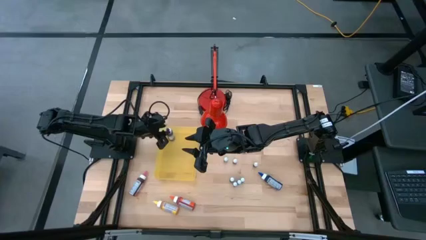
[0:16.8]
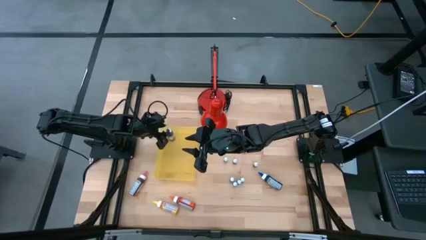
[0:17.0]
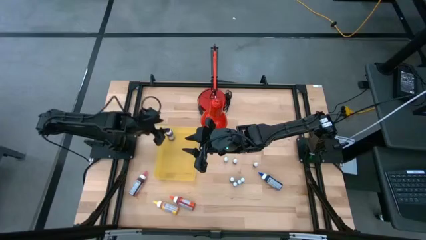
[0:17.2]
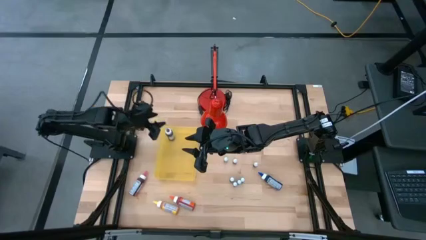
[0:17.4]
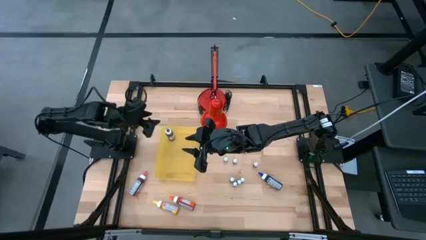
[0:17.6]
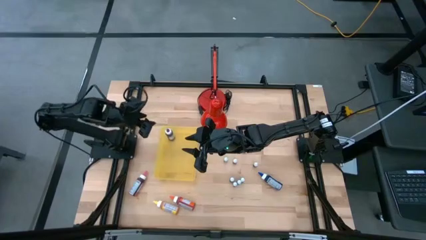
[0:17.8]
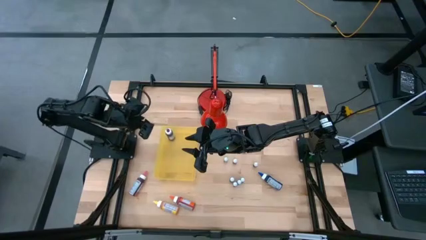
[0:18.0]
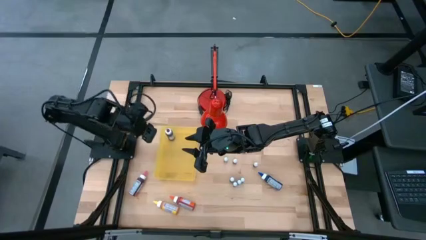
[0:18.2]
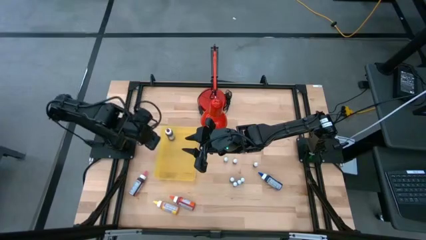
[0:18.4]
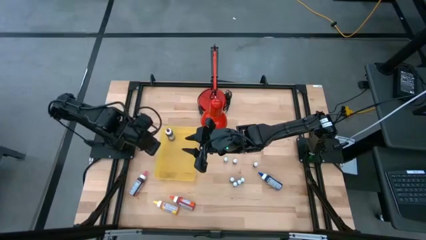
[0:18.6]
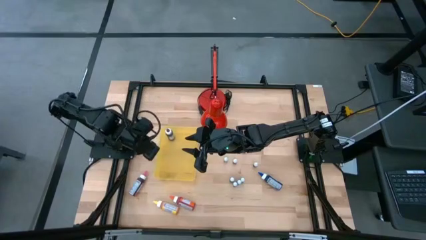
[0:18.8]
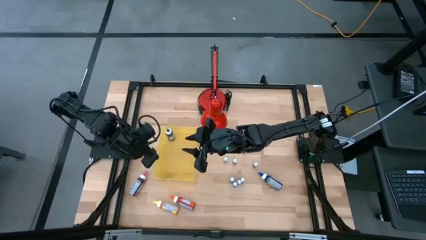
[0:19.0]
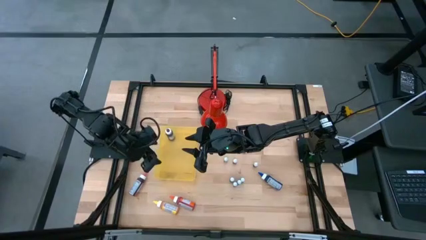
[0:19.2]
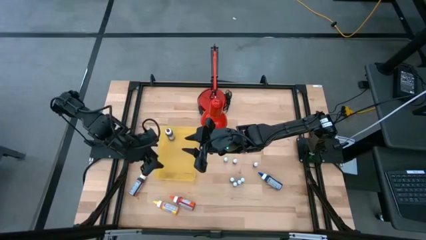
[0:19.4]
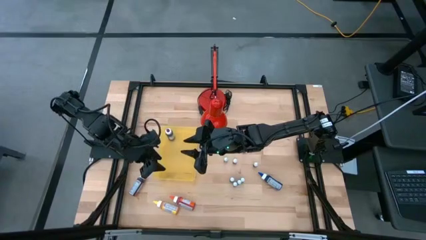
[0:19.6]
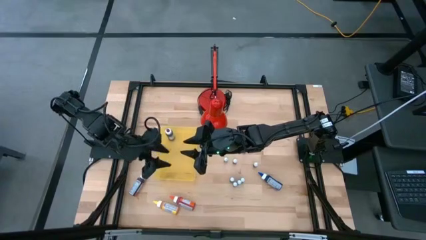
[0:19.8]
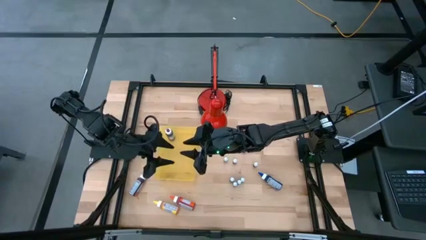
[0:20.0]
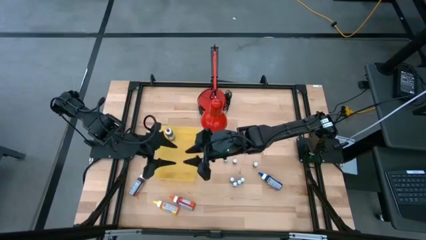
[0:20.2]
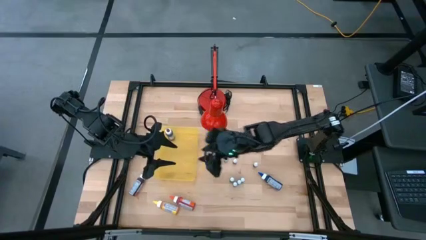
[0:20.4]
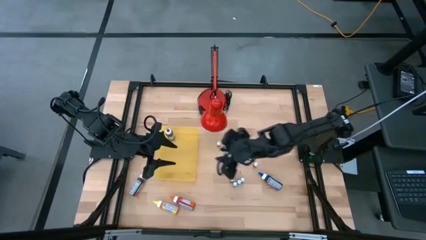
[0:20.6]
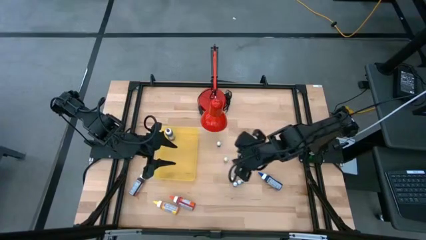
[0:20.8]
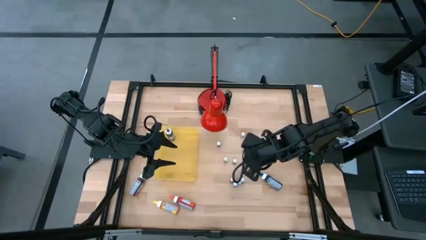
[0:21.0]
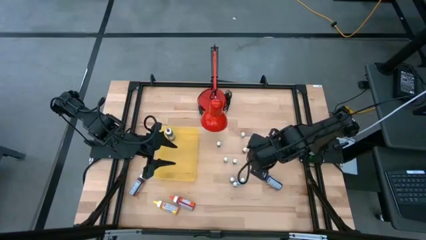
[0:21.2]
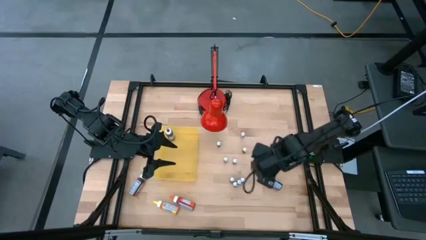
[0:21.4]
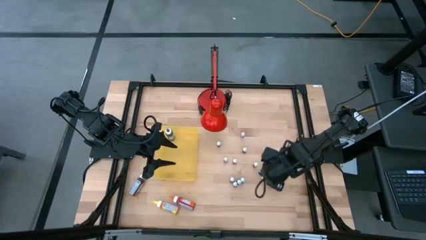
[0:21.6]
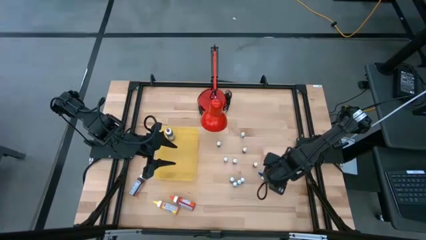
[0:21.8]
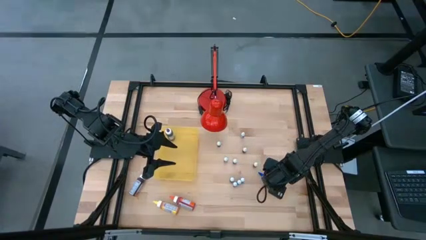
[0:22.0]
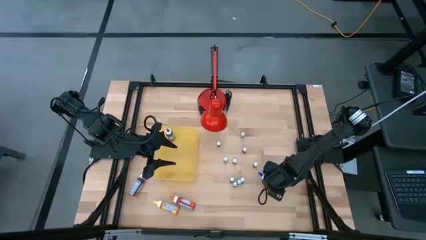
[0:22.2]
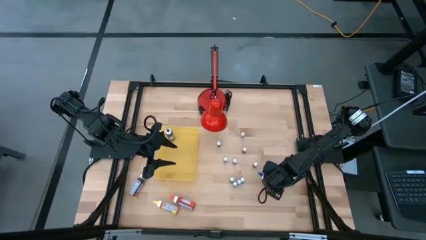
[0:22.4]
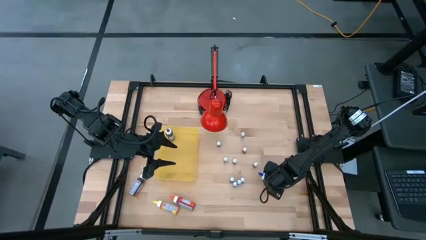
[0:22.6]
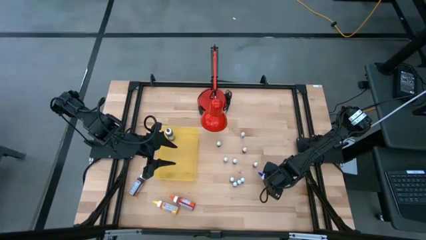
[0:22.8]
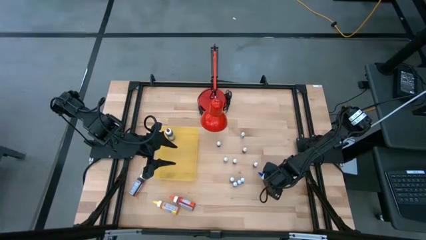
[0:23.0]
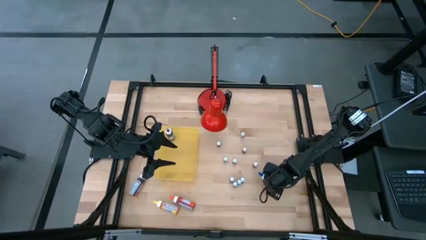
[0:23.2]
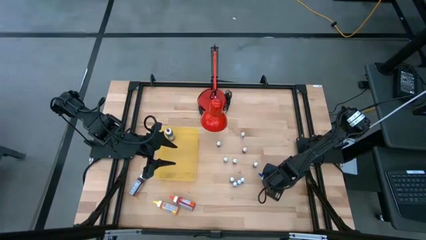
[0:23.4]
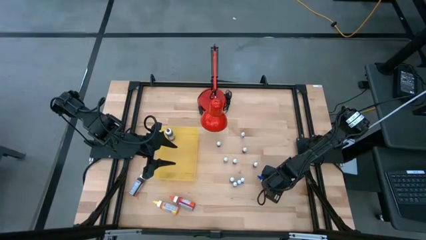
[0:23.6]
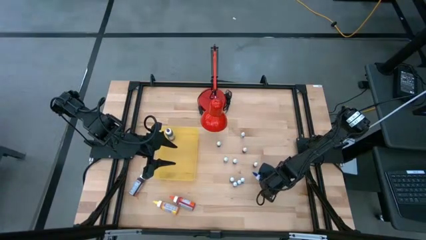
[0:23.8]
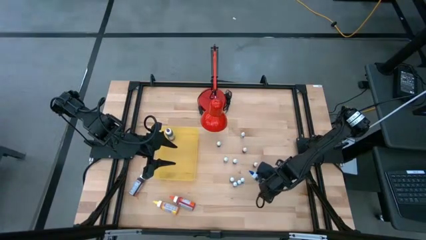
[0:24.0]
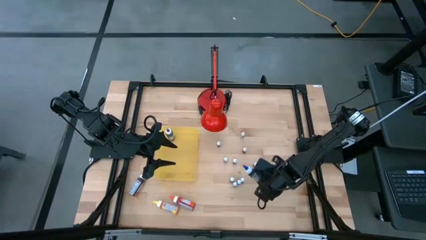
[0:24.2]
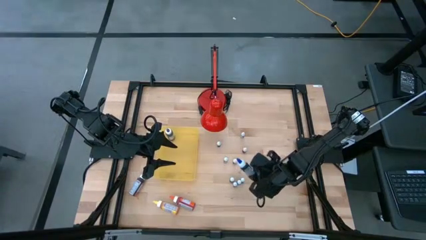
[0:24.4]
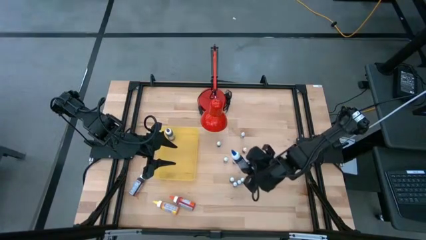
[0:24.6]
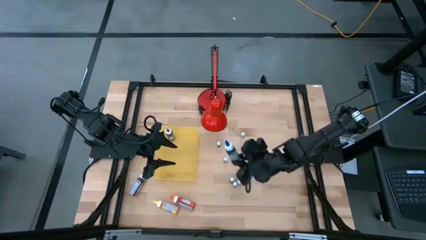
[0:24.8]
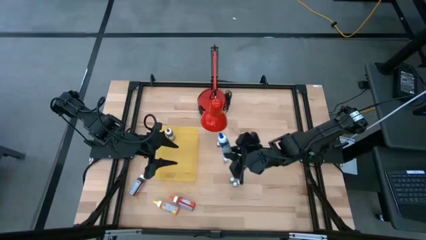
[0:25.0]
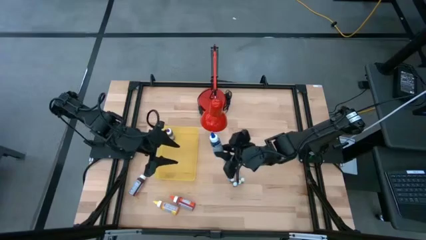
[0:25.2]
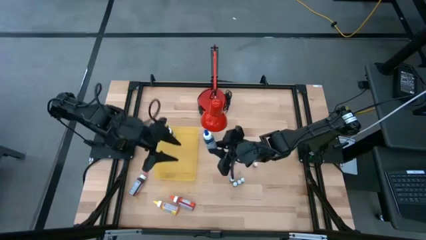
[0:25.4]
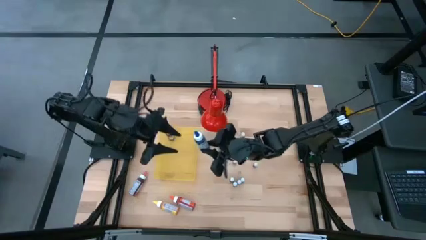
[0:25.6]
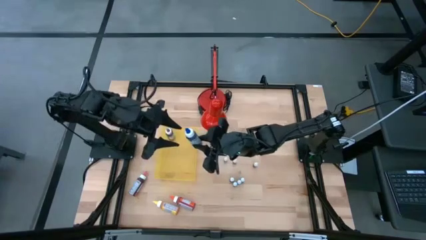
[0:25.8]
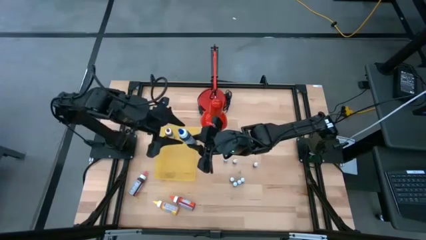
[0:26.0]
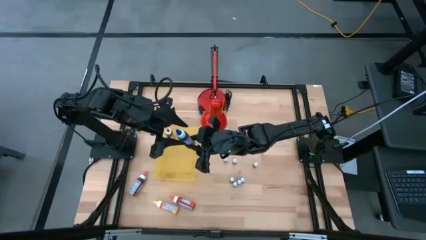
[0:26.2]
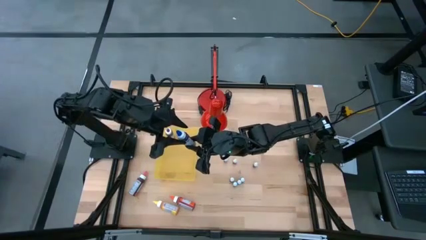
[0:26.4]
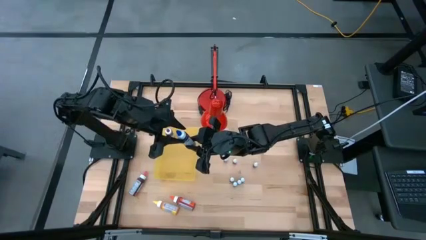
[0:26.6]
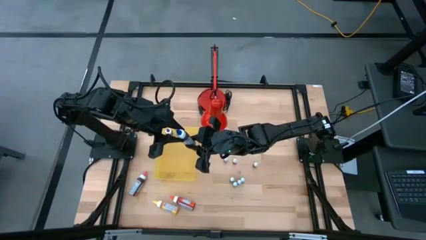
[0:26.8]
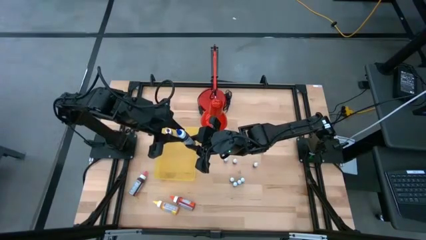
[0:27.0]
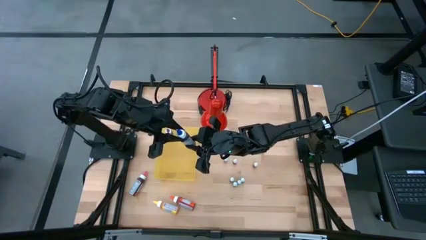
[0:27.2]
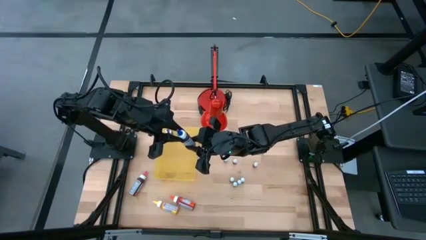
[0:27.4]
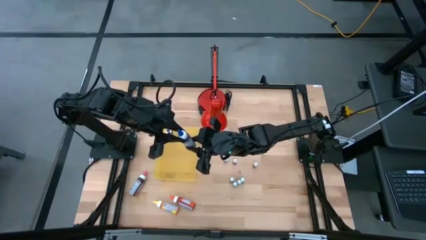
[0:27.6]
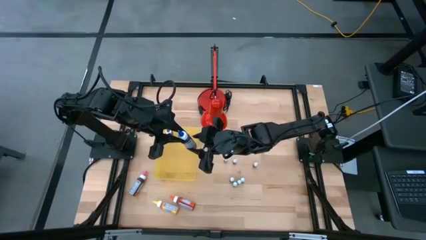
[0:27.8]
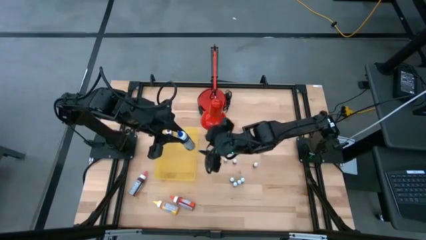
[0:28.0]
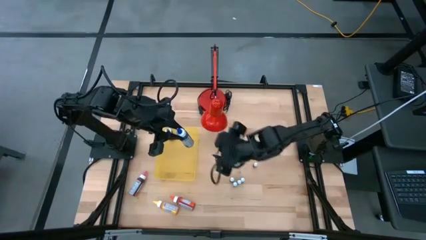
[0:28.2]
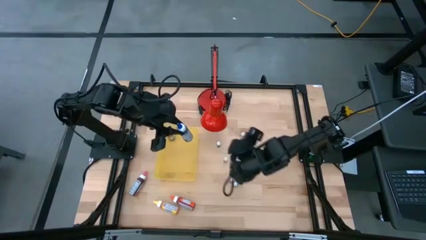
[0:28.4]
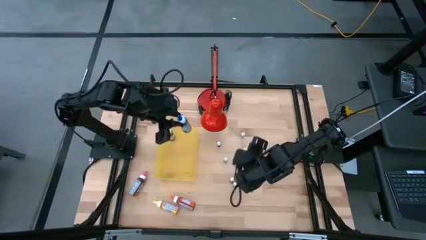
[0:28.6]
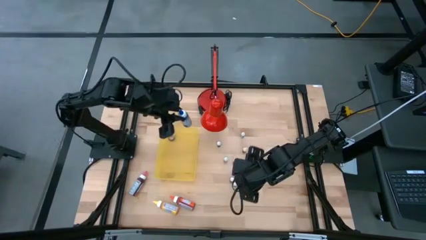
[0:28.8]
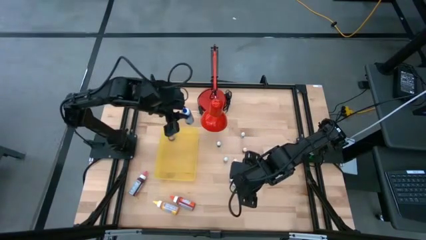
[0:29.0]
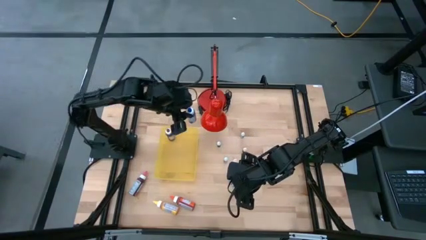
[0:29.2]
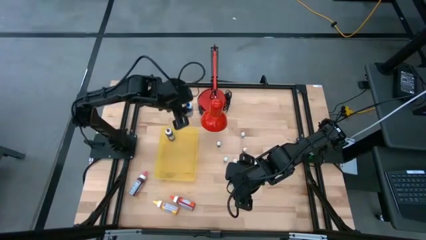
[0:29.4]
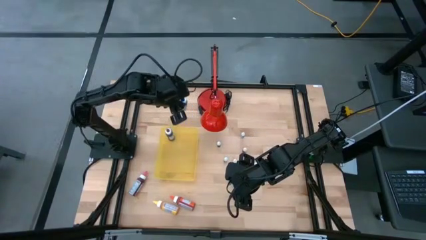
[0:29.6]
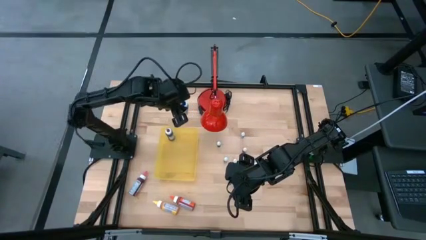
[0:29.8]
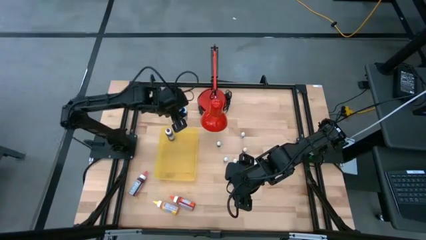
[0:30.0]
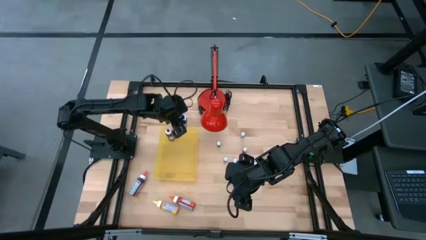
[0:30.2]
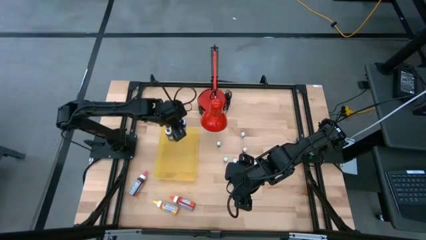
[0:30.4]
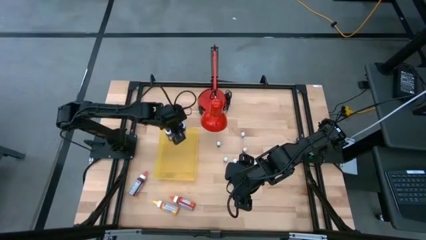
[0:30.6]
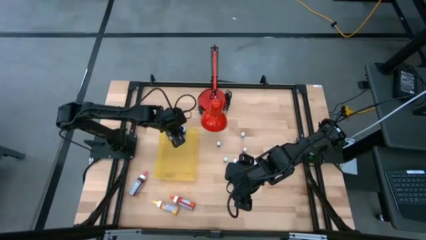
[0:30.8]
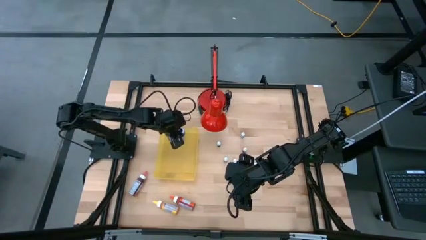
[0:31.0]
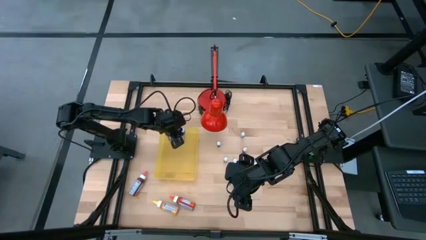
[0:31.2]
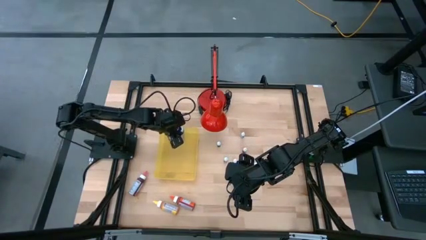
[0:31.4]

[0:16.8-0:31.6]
Task: Pick & Place food coloring
Put the large blue food coloring bottle into the yellow bin
